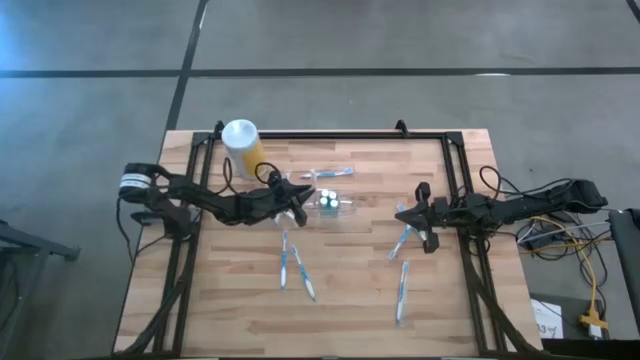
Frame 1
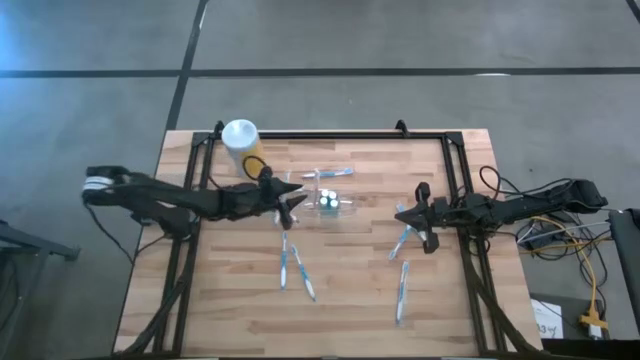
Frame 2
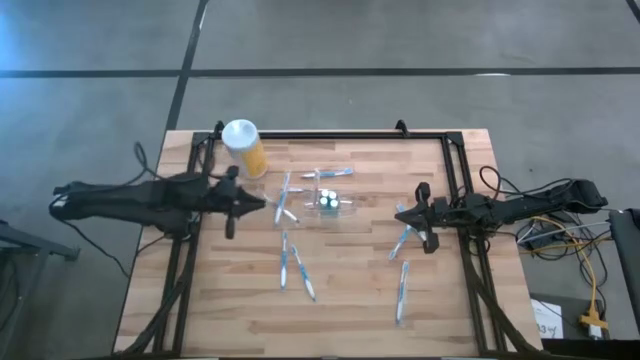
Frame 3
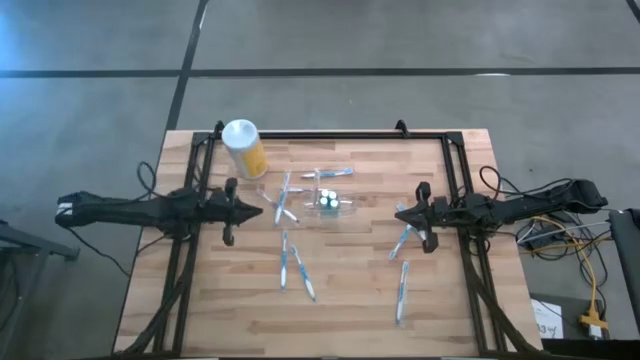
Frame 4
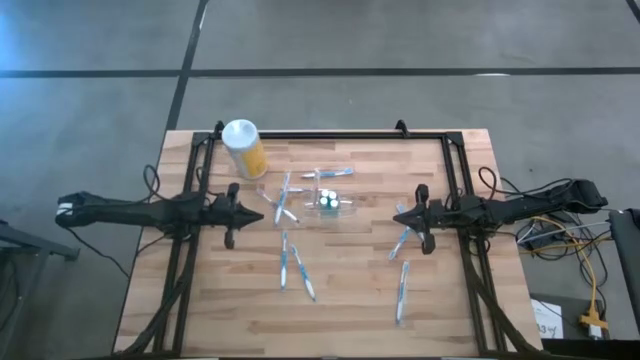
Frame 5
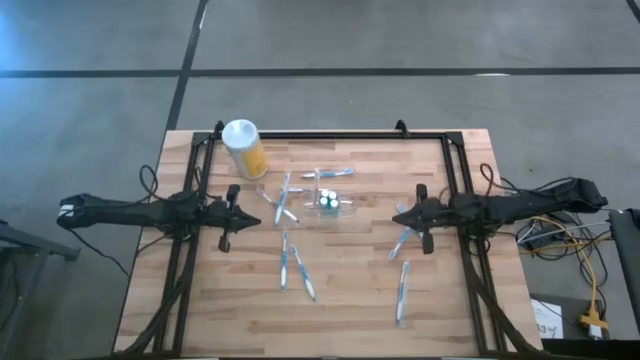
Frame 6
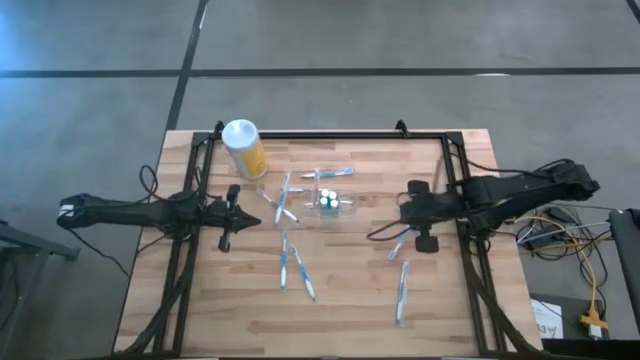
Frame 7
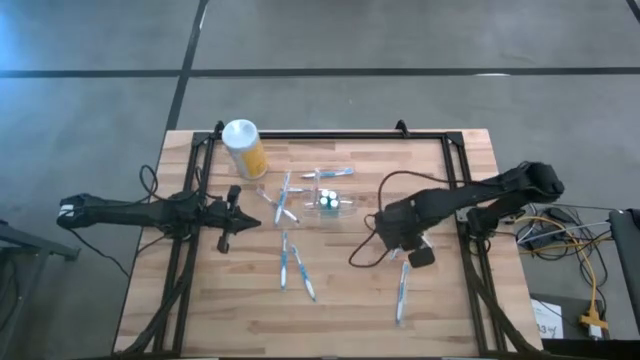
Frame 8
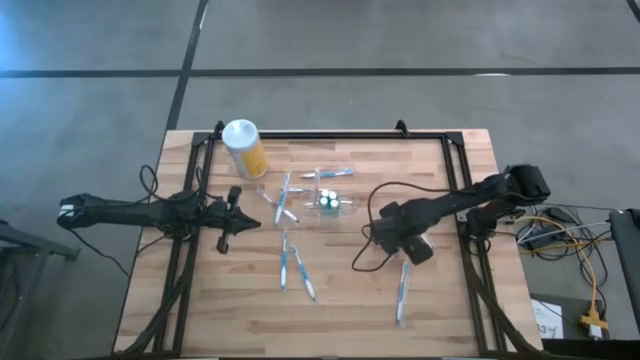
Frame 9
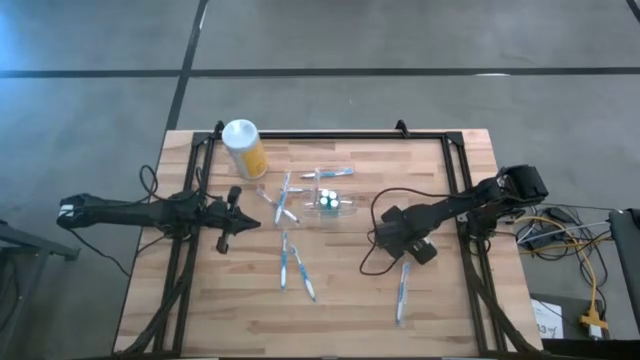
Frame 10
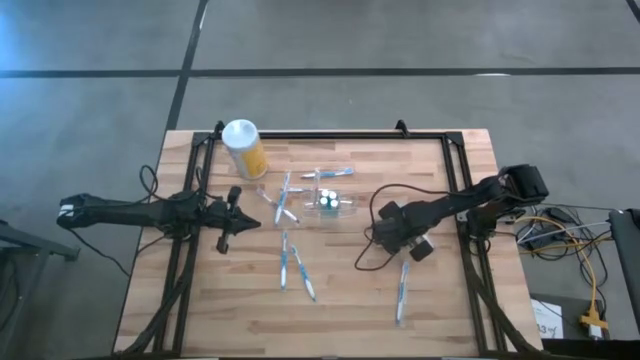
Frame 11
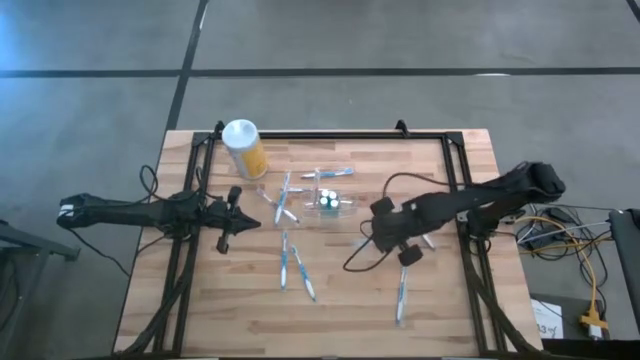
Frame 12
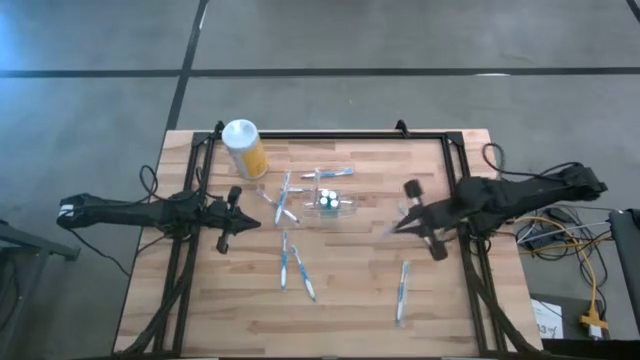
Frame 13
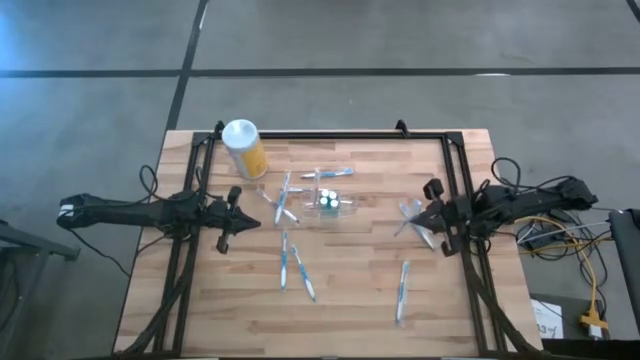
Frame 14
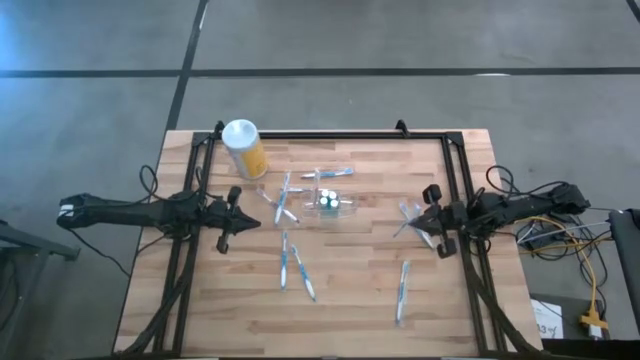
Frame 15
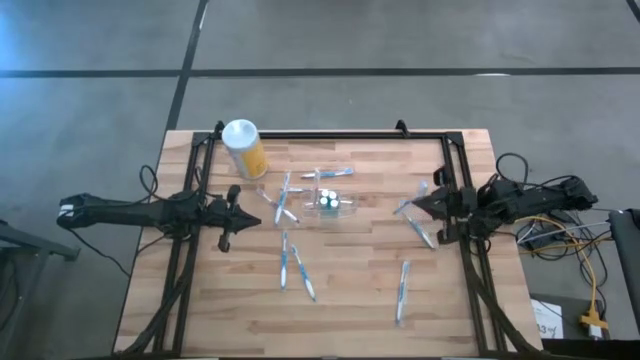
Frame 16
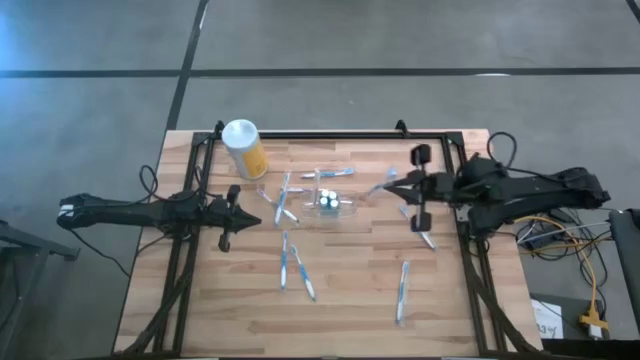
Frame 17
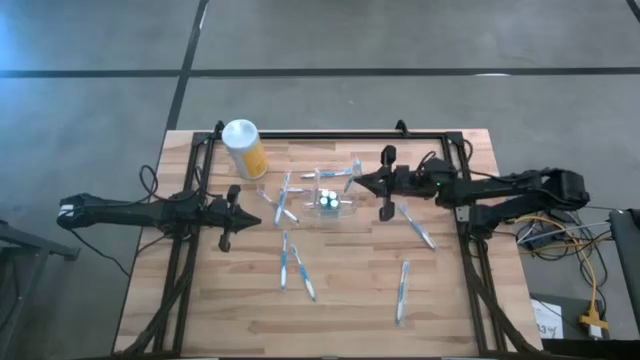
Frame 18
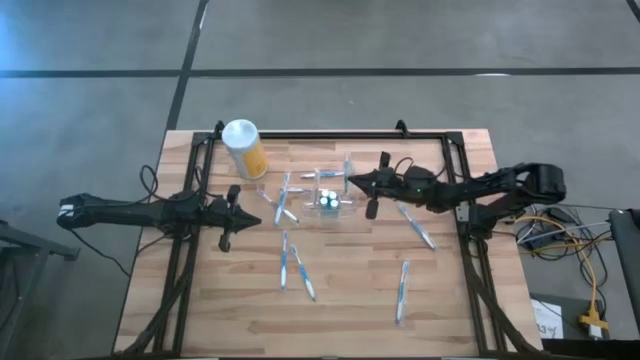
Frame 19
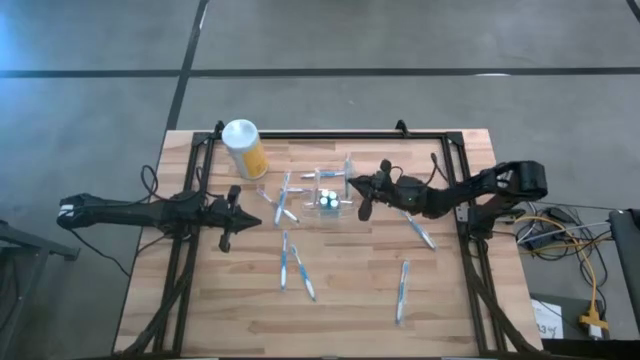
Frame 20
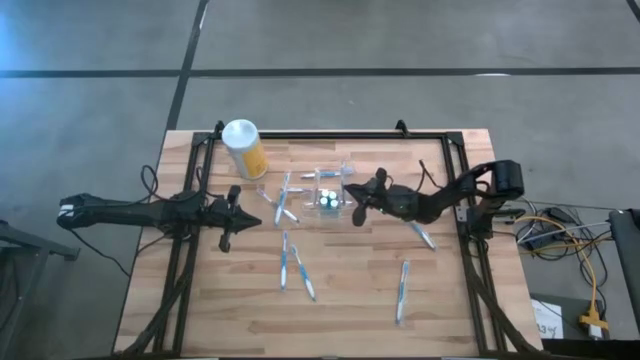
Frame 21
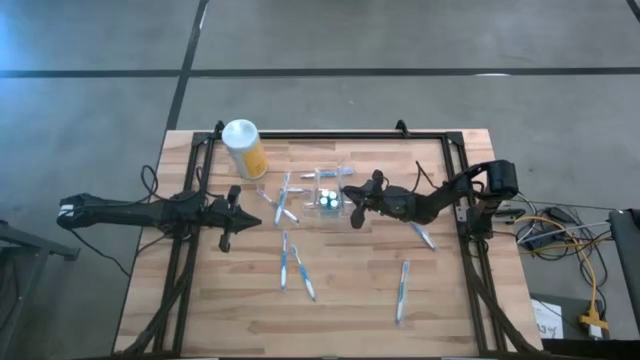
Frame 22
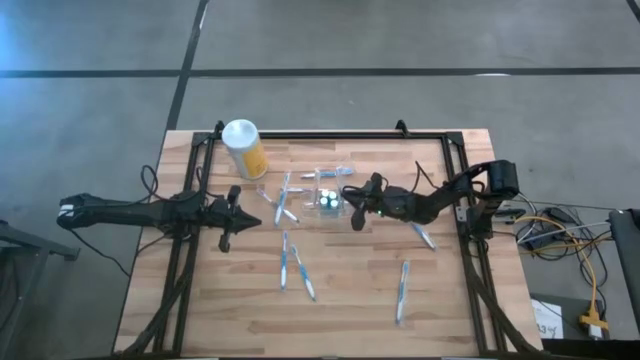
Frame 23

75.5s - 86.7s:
Task: Pick & Place toothbrushing station
Put the blue toothbrush into the right section of the transparent organizer

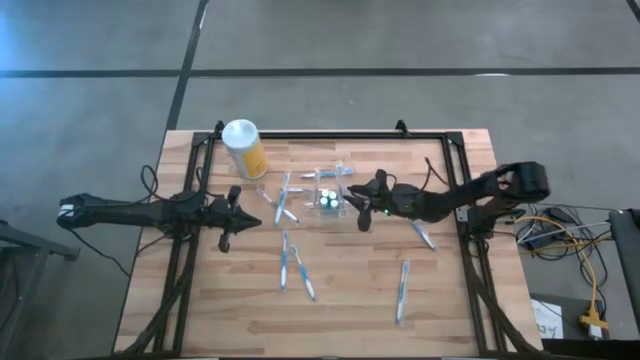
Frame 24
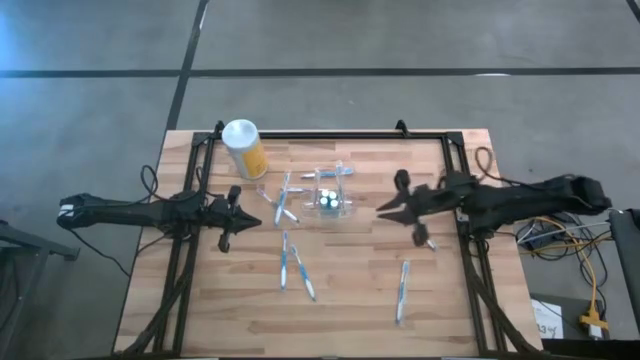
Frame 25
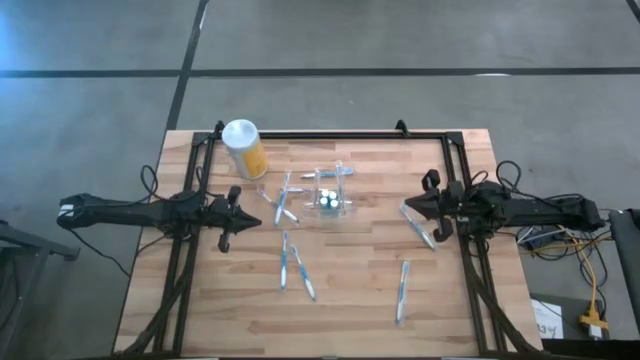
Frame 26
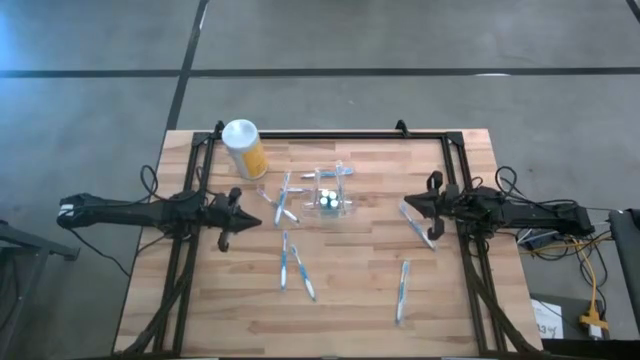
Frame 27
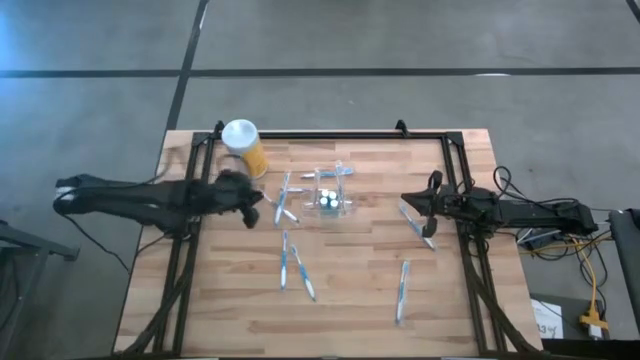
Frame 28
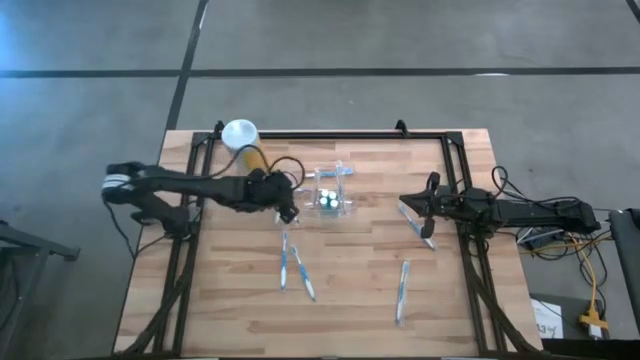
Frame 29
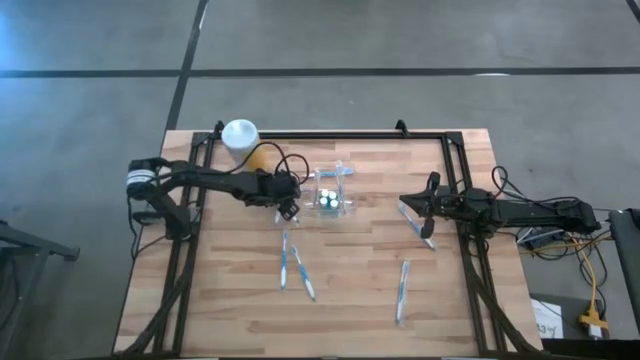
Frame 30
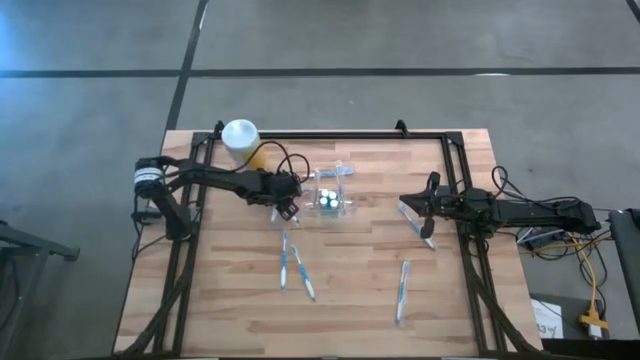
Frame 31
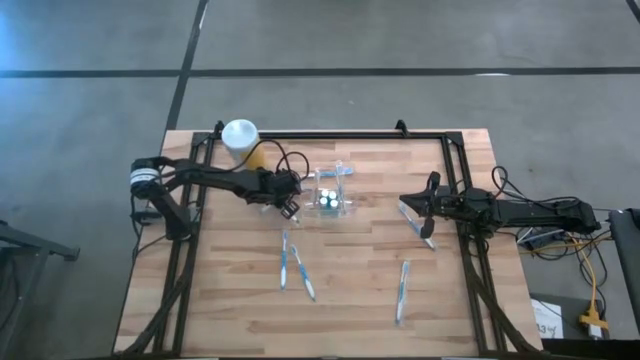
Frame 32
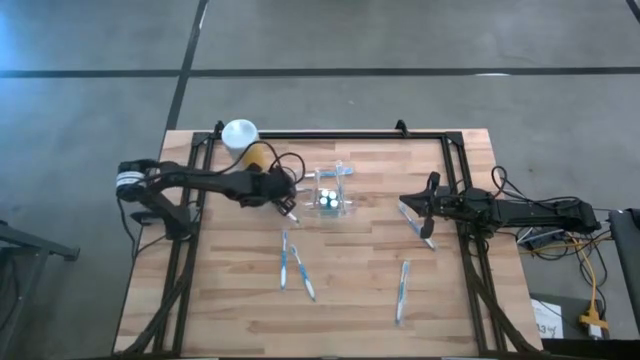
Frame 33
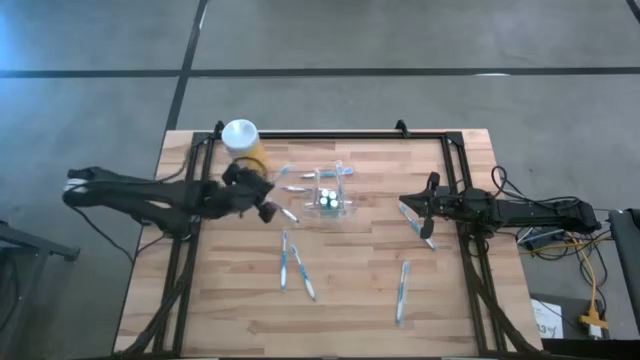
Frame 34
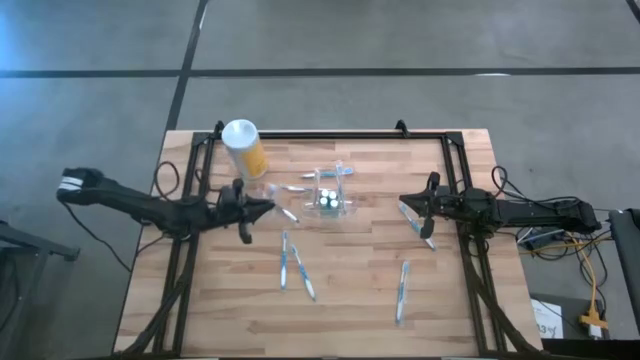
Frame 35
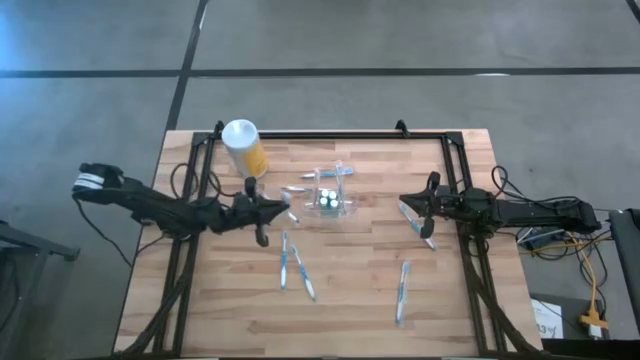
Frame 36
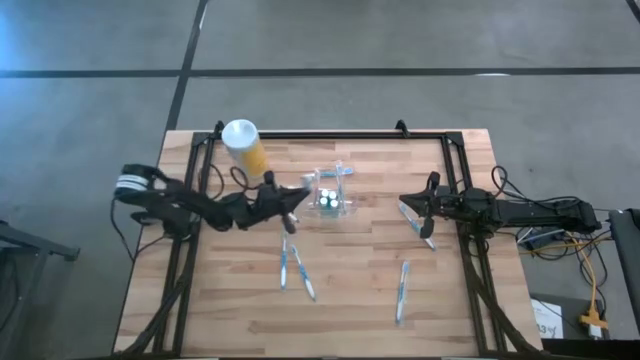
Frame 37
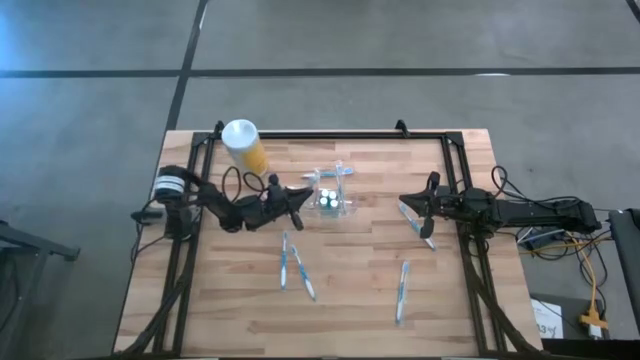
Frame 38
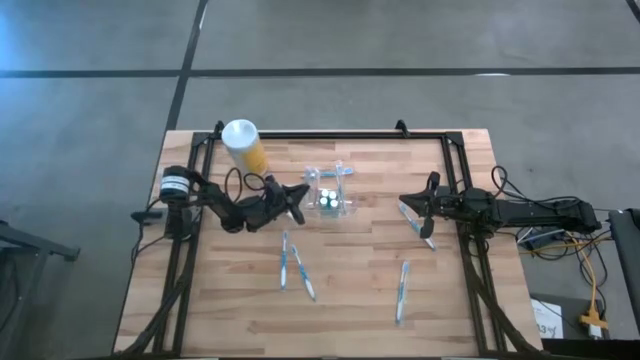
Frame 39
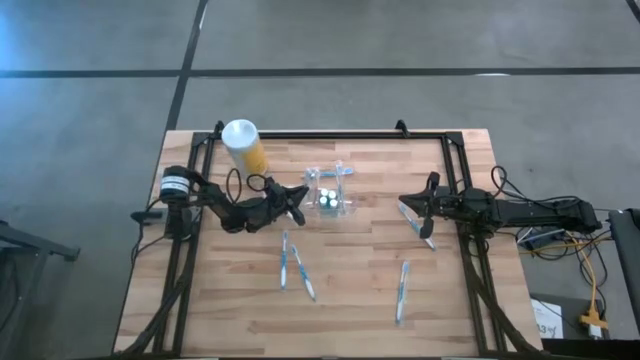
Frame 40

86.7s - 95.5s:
Put the blue toothbrush into the left section of the transparent organizer
